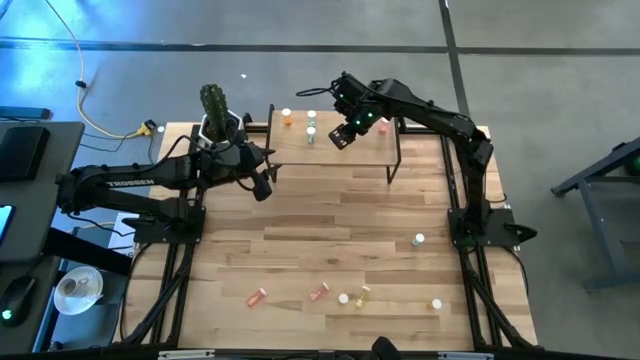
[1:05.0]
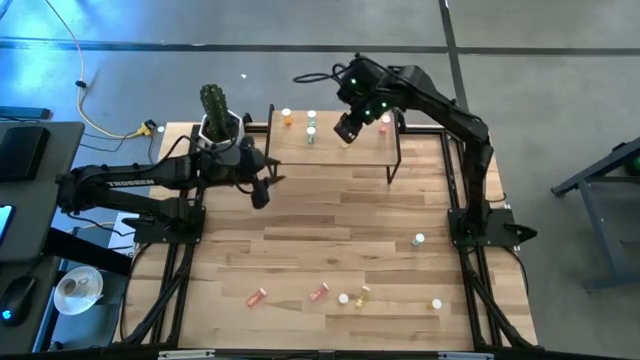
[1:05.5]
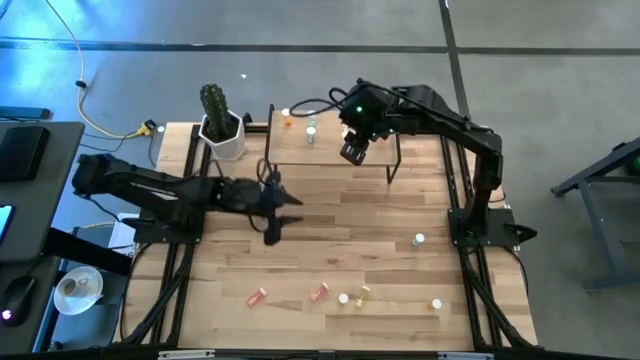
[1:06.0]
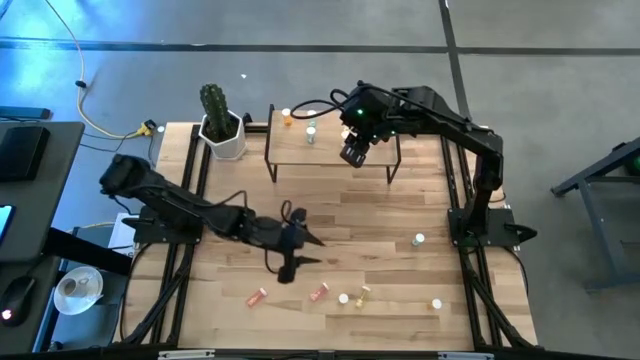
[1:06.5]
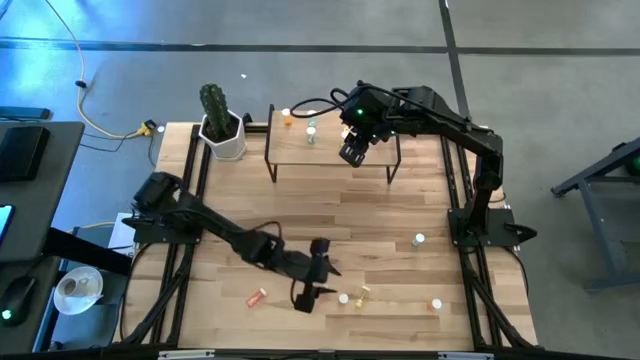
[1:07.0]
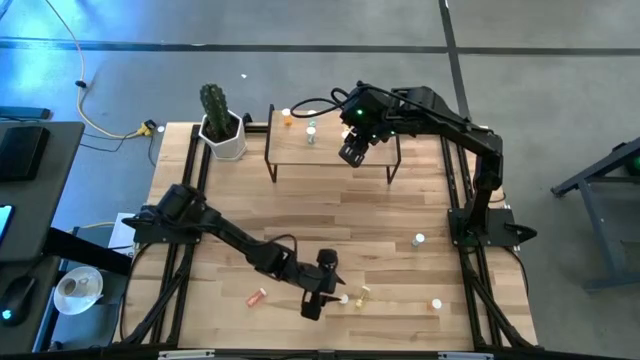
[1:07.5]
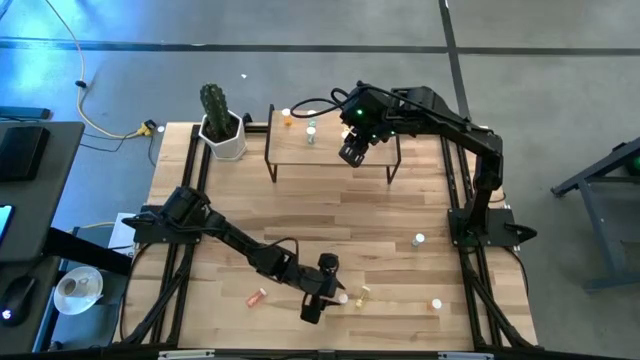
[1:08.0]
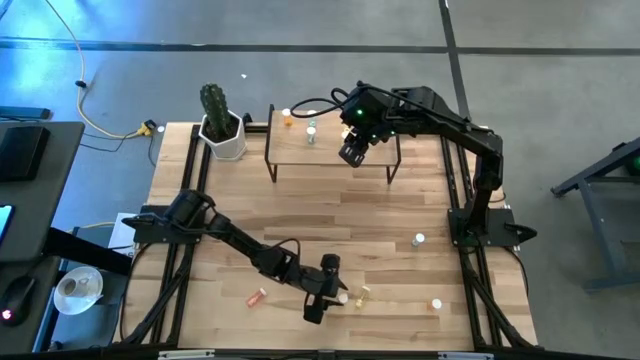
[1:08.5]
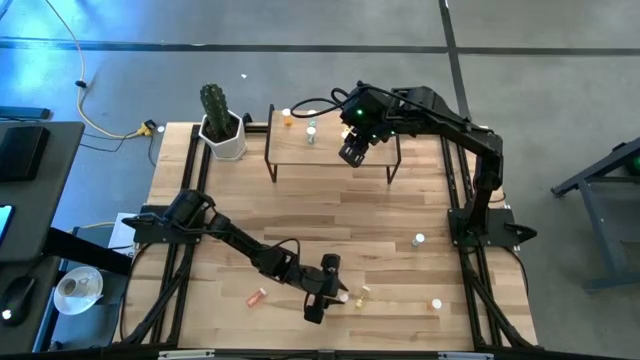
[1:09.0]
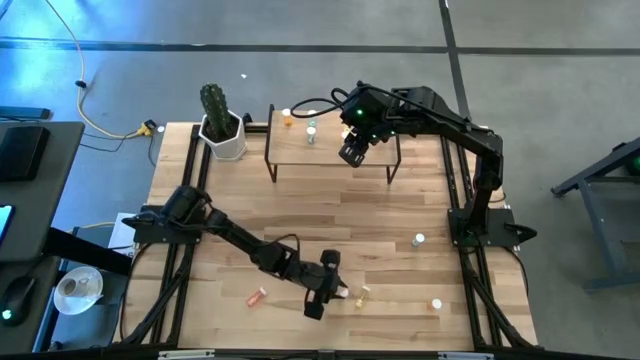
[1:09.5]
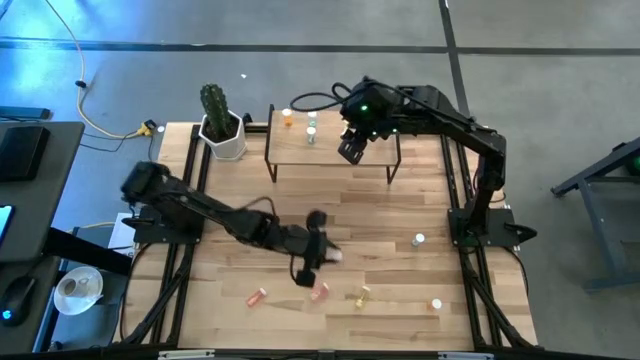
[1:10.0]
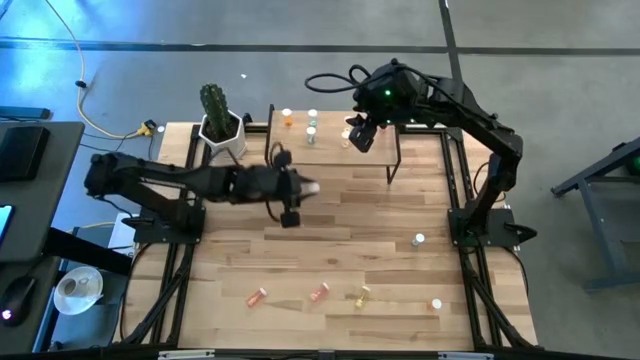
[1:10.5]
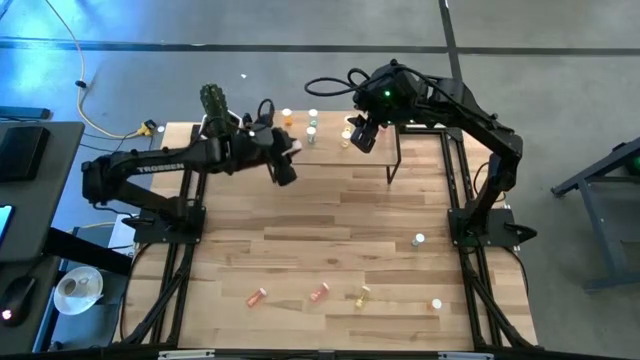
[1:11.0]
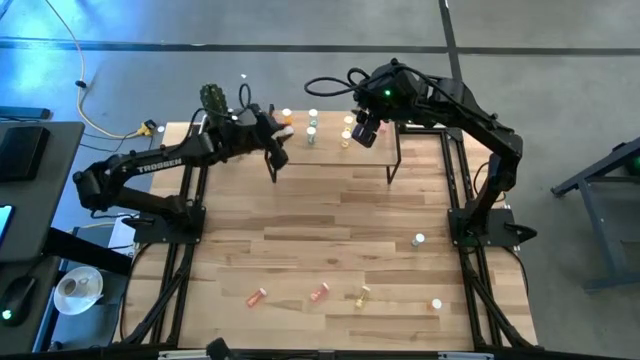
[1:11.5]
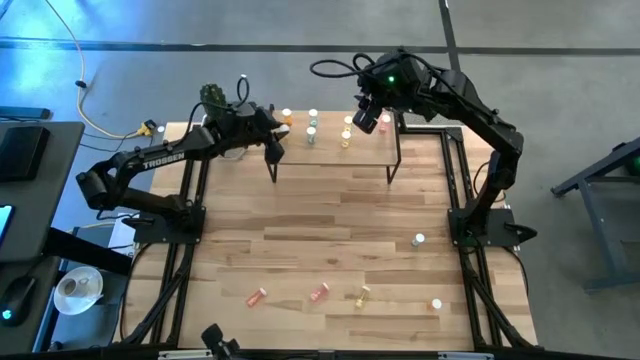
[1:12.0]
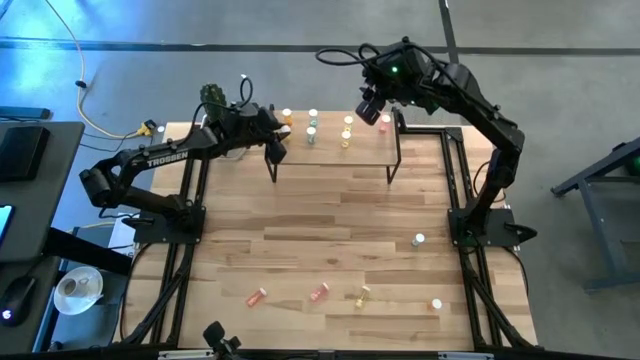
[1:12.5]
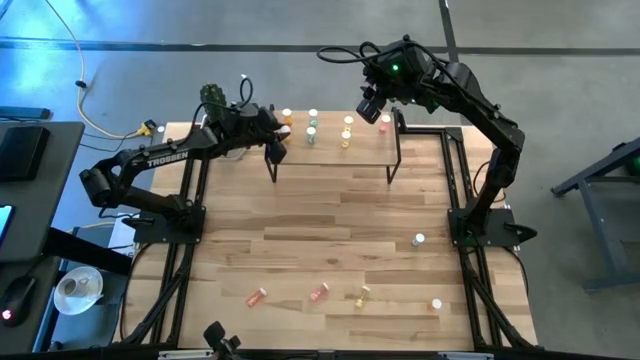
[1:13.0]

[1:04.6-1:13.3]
Task: Pick and place medicine bottles onto shelf by color
Put the left orange pill bottle on the shelf

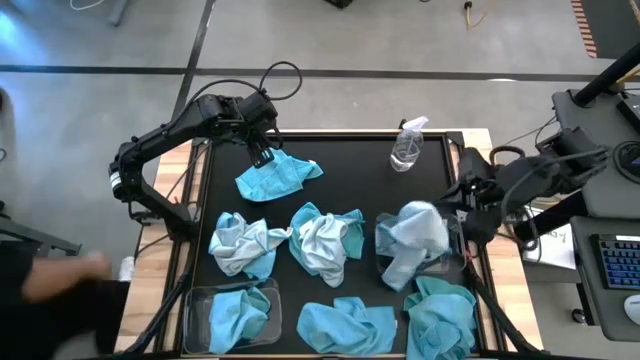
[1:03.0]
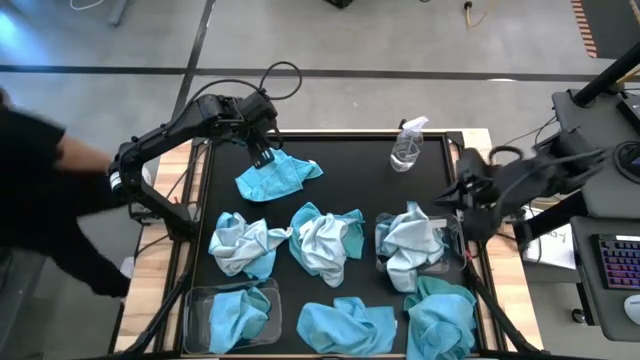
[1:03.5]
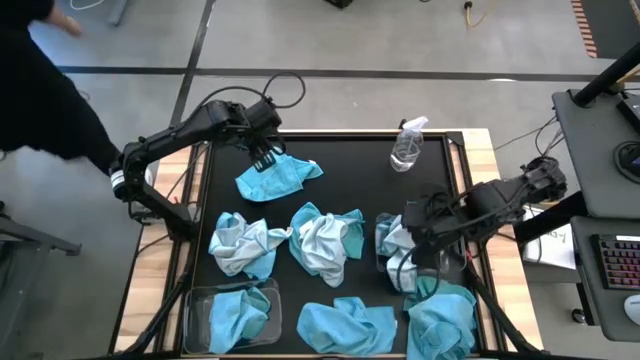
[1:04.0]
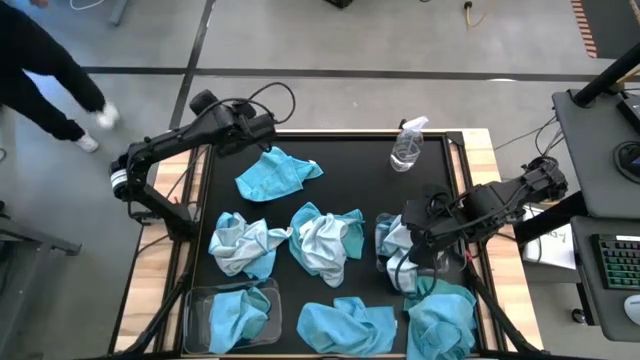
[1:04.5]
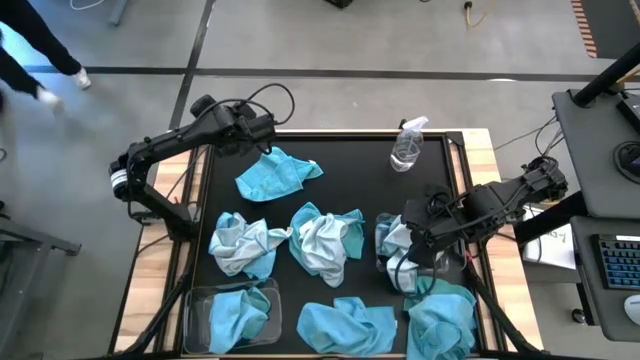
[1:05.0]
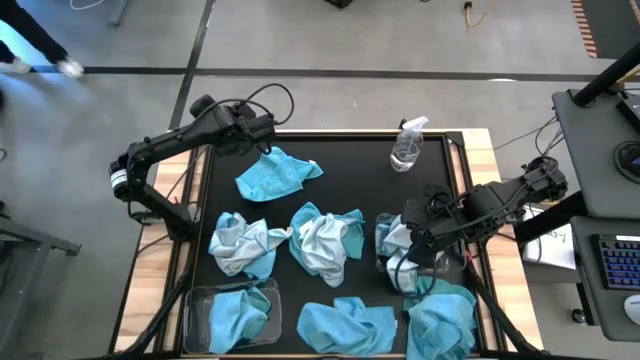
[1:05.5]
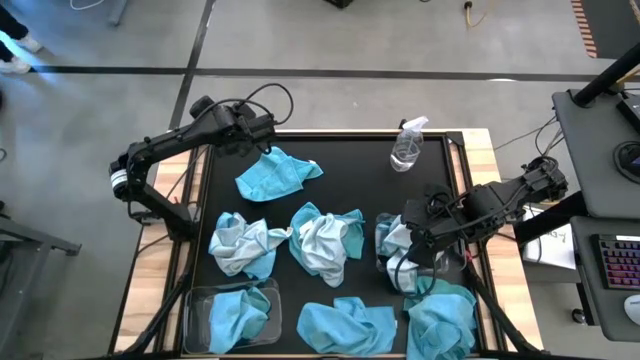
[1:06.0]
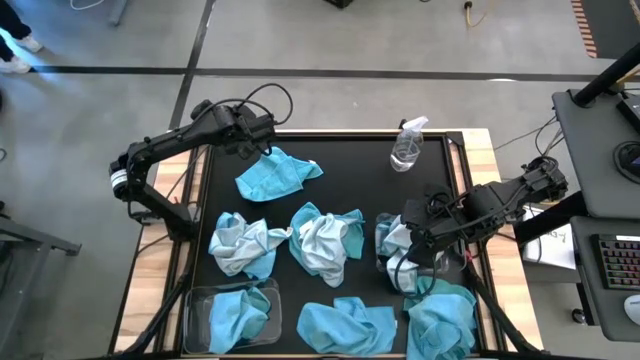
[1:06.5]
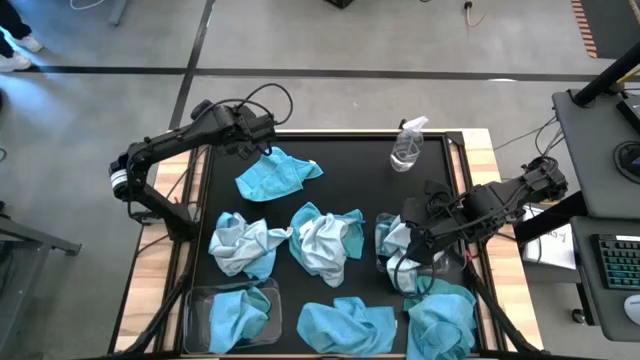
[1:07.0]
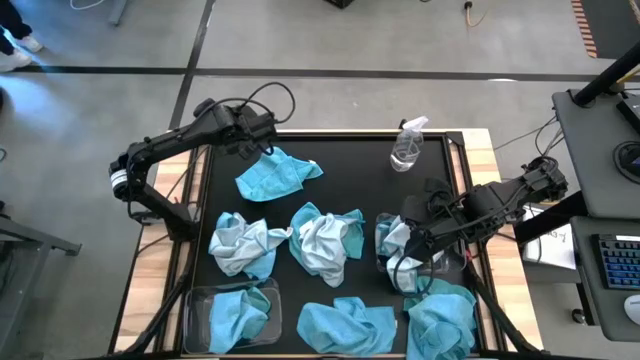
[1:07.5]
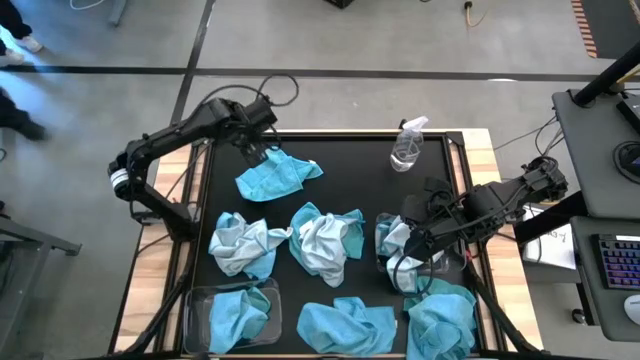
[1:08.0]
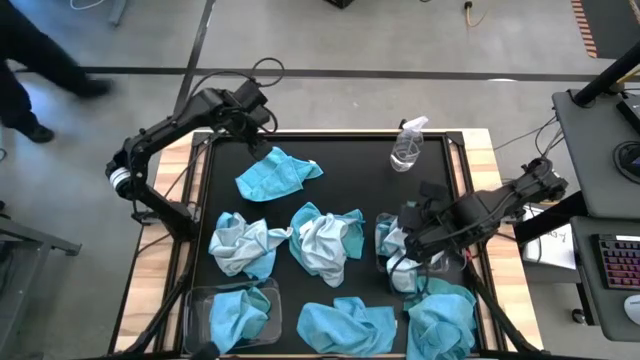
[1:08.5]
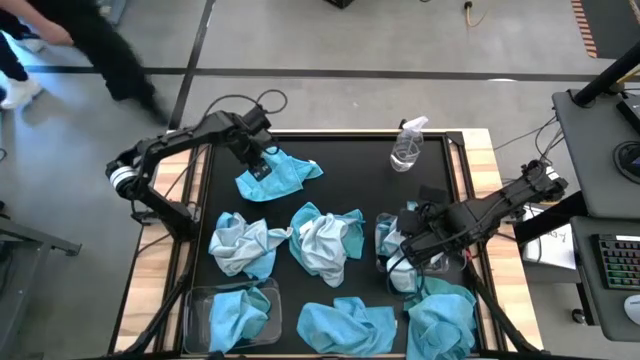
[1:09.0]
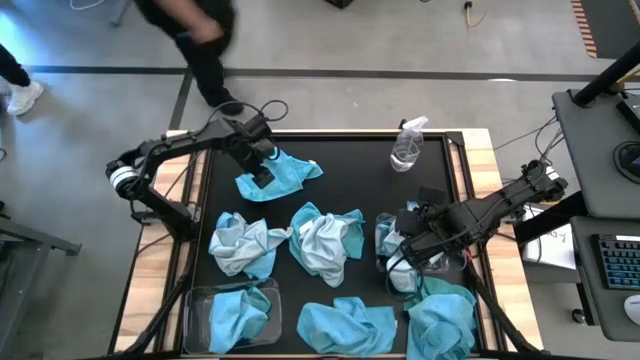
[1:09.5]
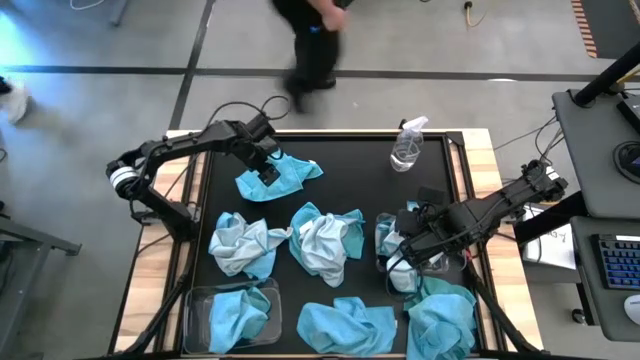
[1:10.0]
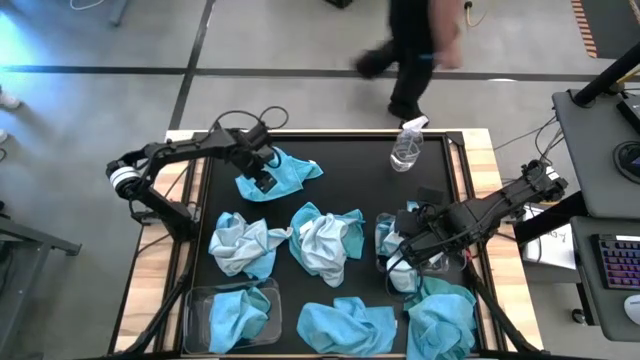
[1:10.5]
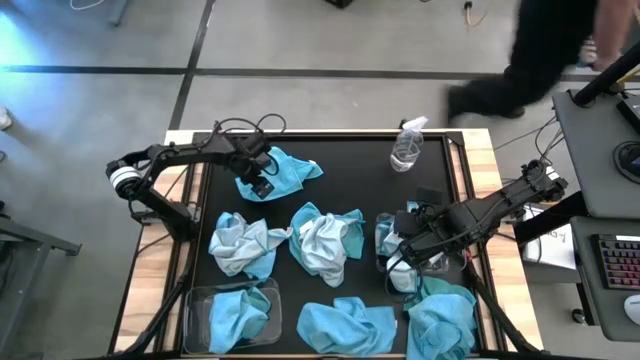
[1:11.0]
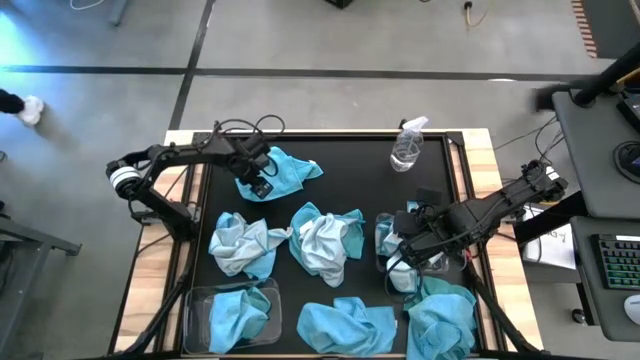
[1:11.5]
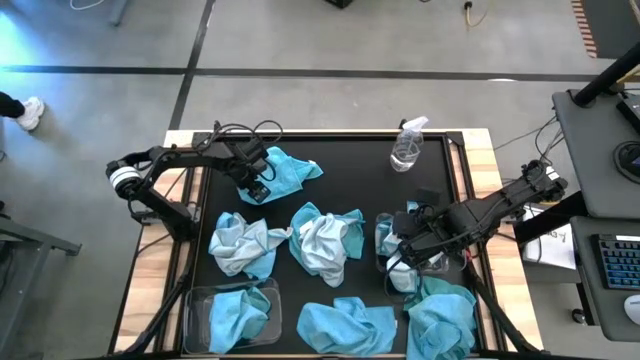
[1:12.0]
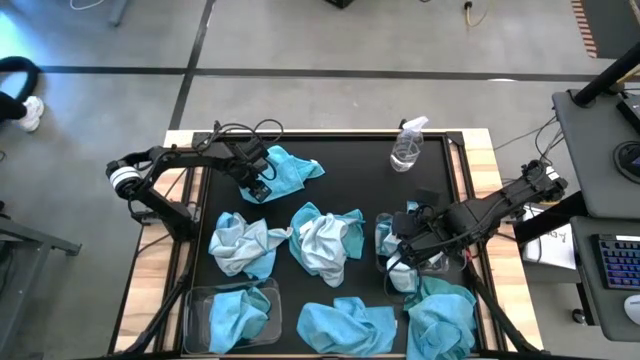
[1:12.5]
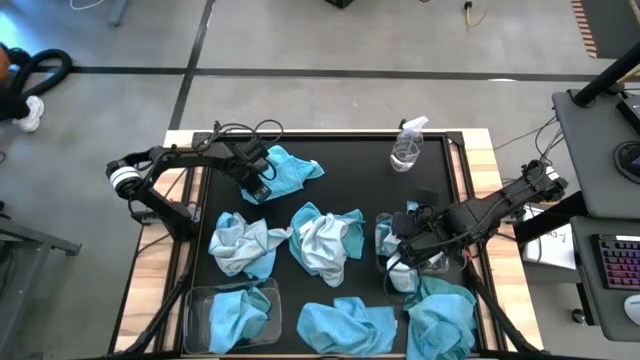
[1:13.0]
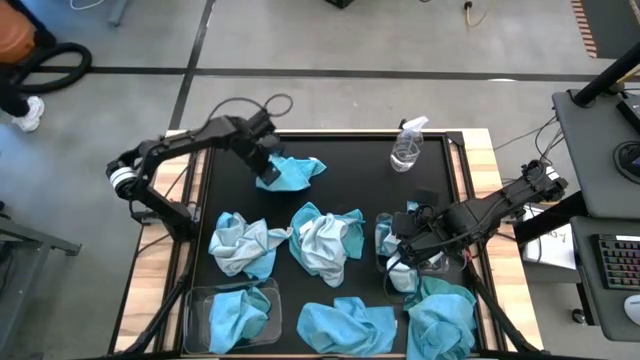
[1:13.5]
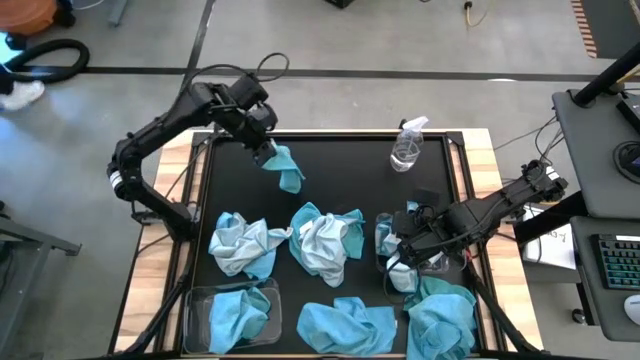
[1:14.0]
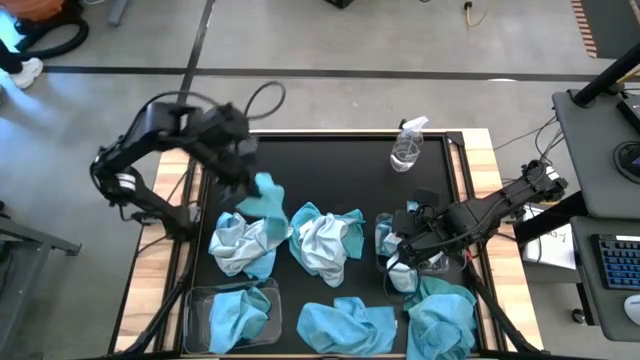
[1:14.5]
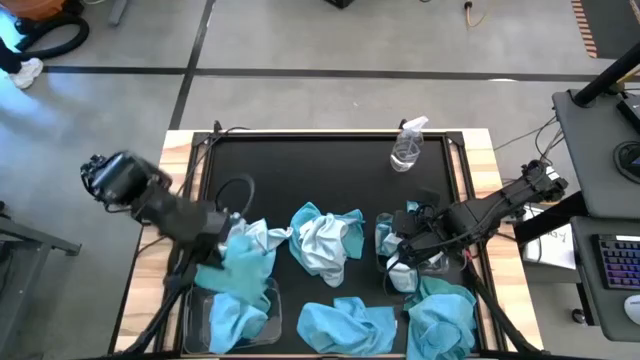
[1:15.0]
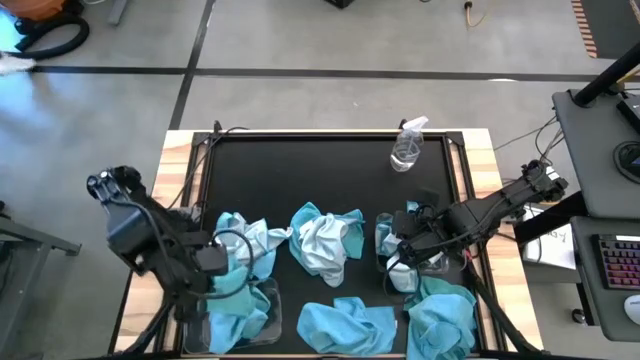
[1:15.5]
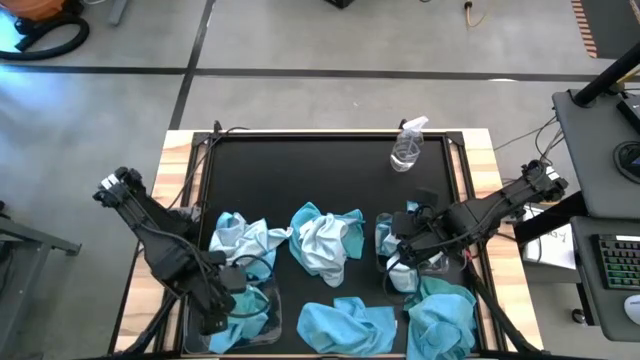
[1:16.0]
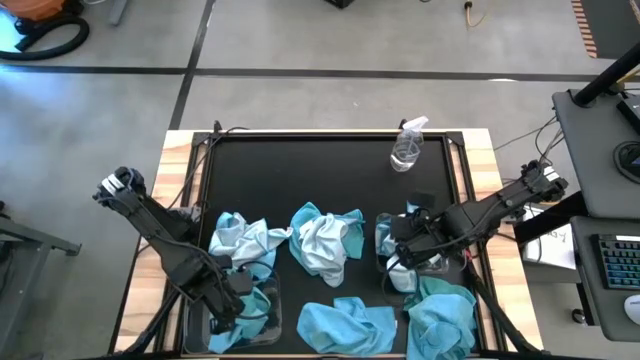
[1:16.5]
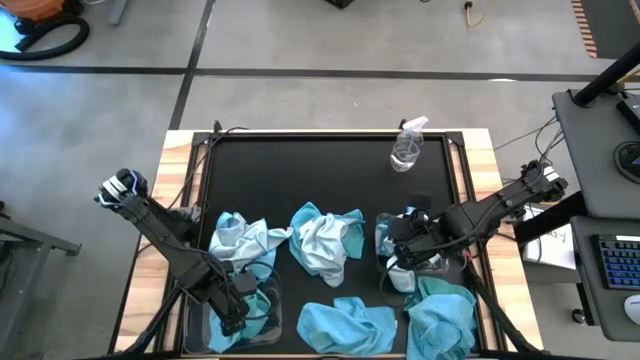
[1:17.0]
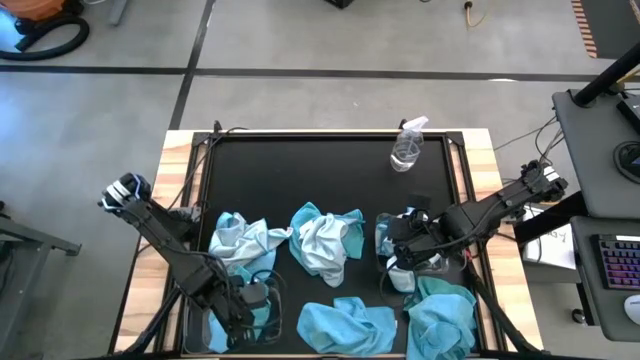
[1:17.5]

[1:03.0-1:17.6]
Task: Sort microfiber towel by color & place in baskets
Put the blue microfiber towel into the left transparent bin
